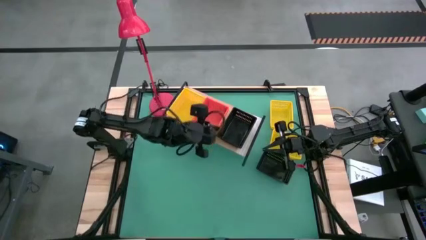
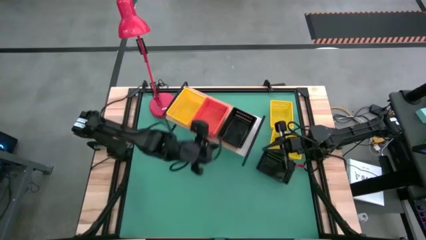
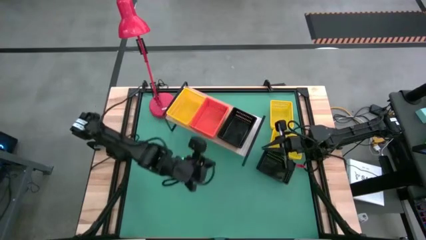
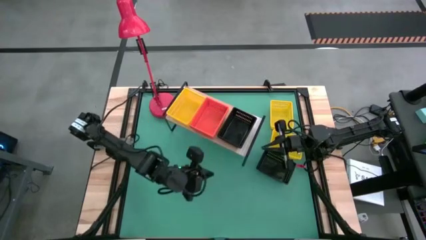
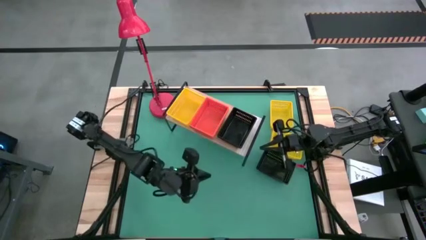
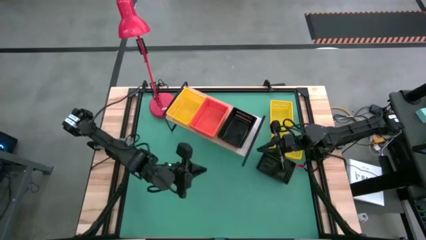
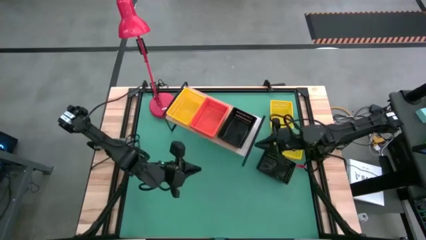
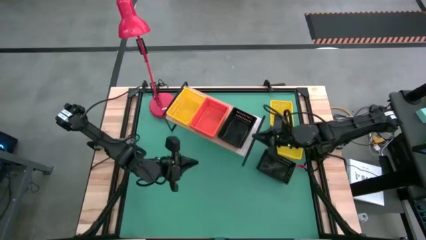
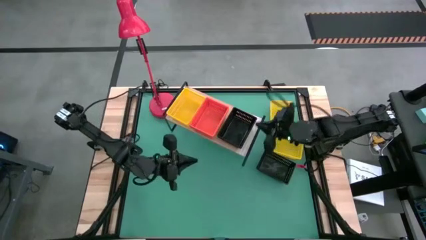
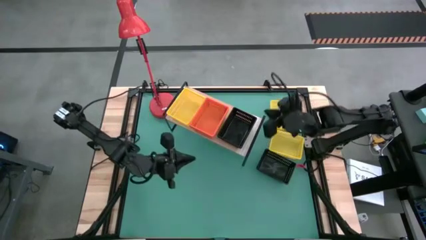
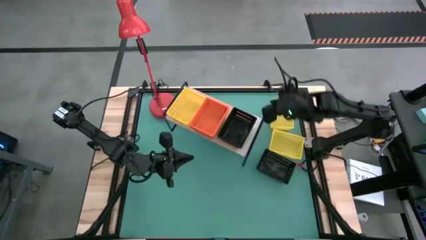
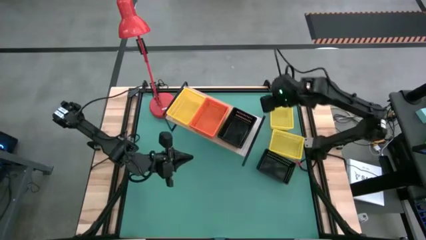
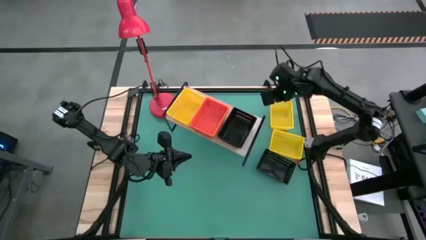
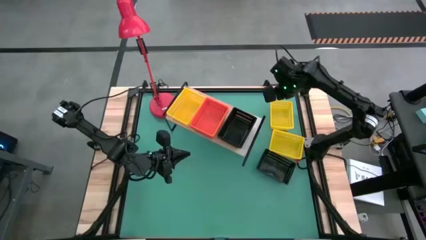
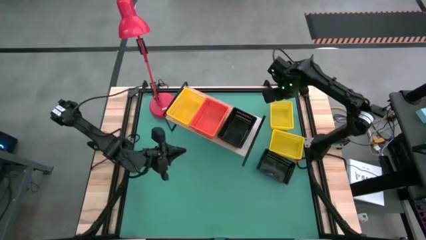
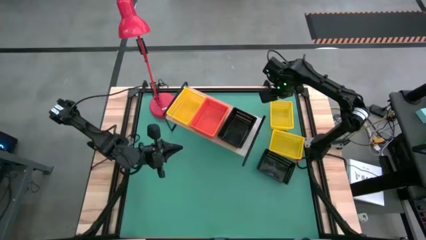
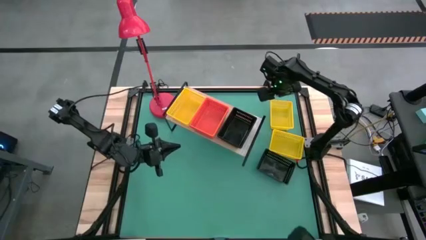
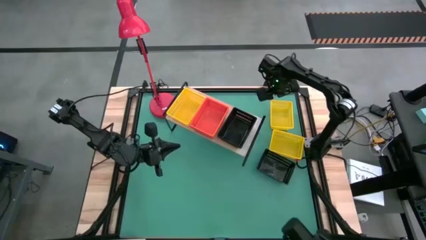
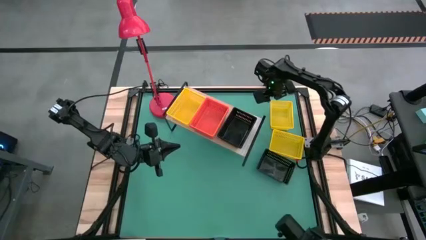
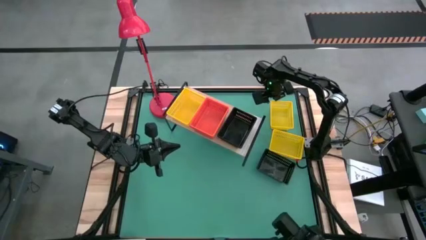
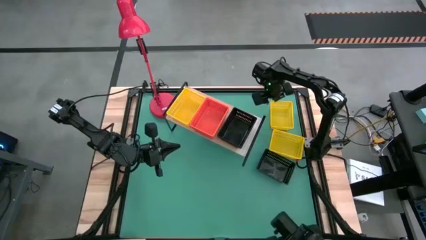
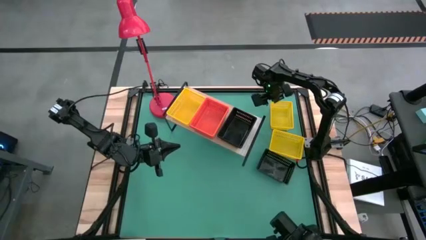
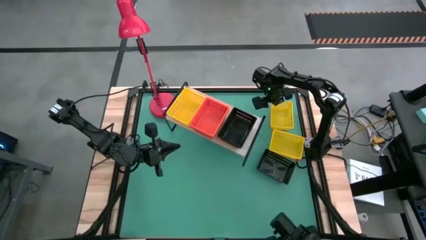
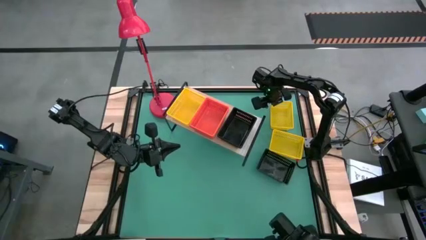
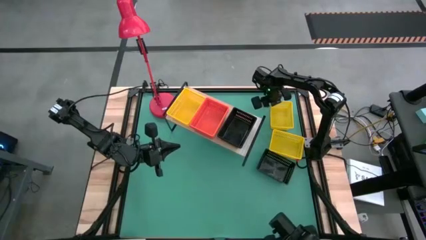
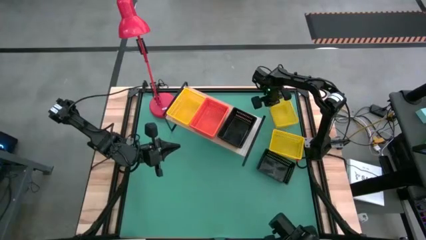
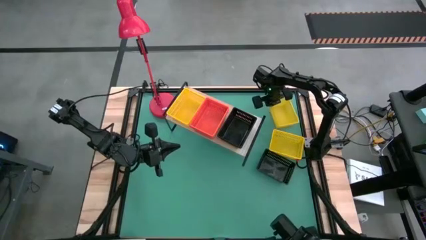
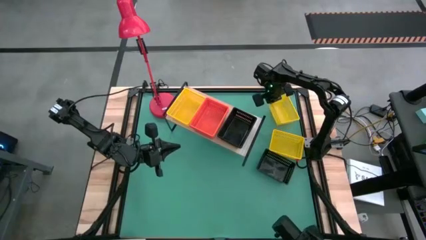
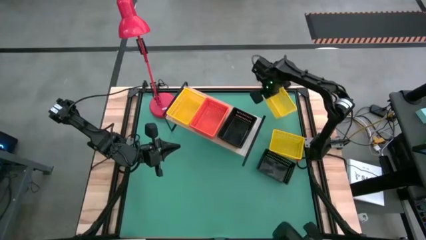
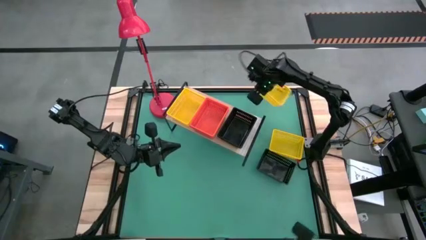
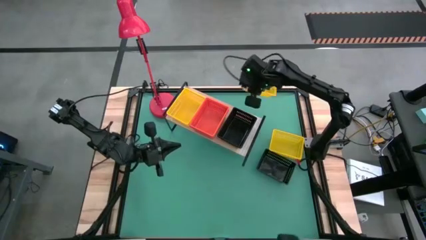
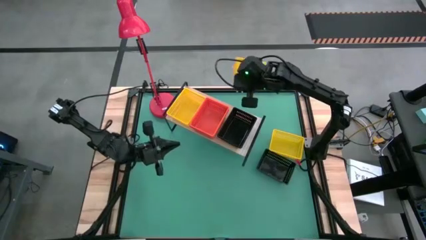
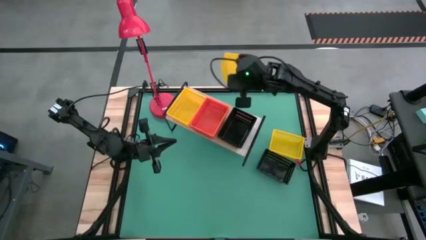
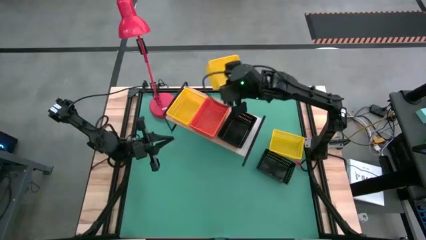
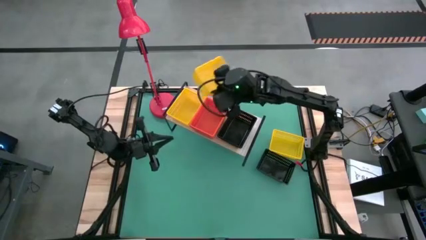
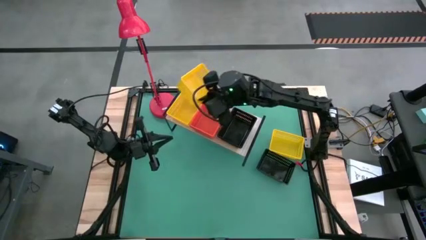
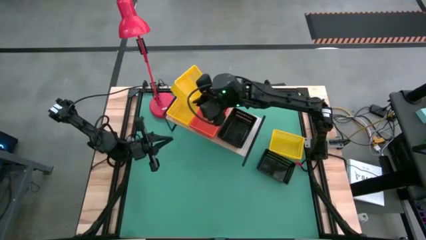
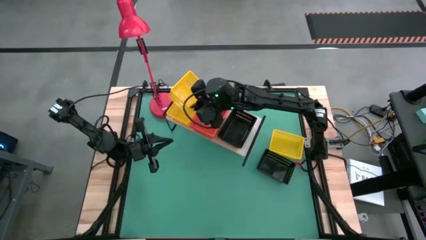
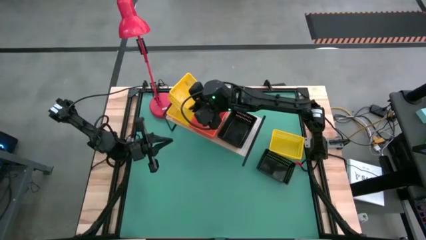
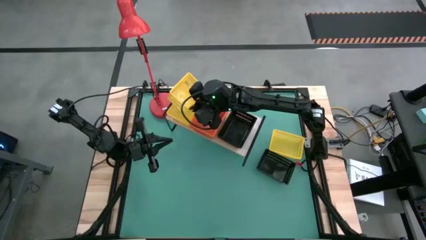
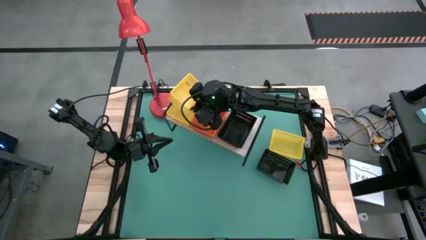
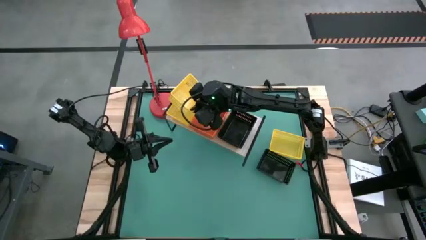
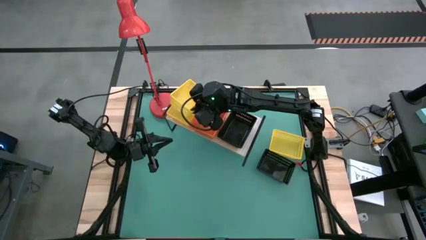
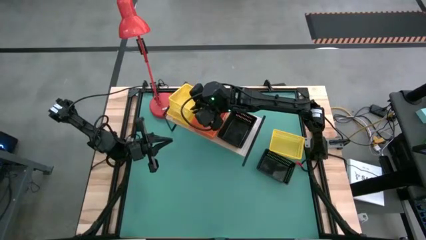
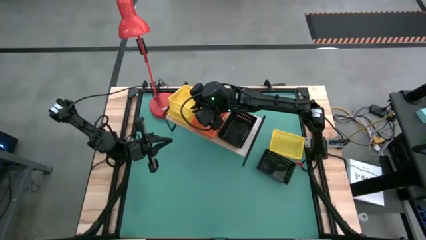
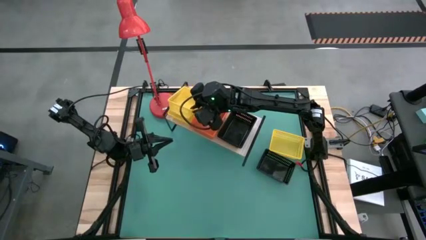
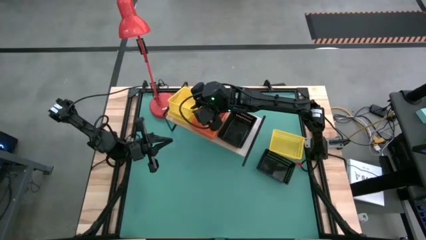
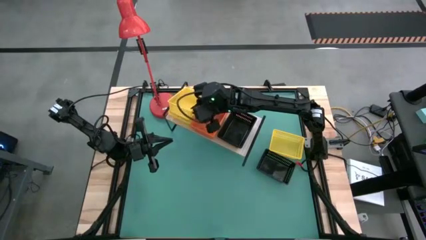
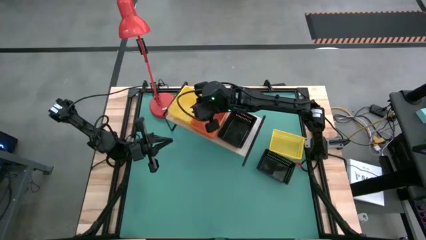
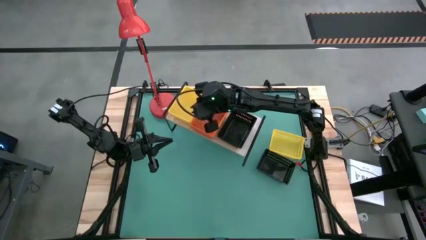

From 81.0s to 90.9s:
Task: Stack baskets on shelf by color
Stack the top yellow bin on top of the other yellow bins on the shelf

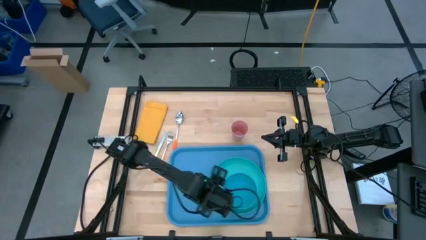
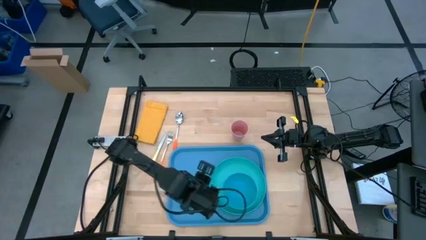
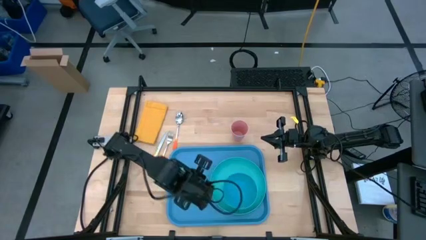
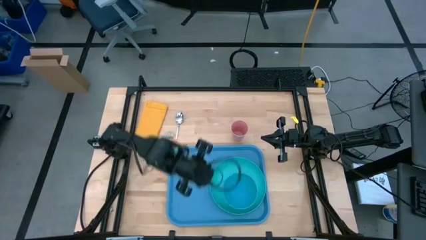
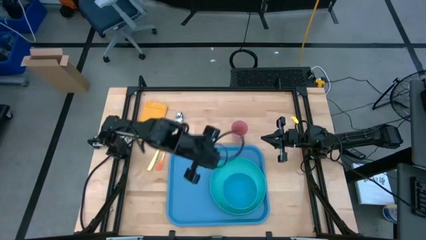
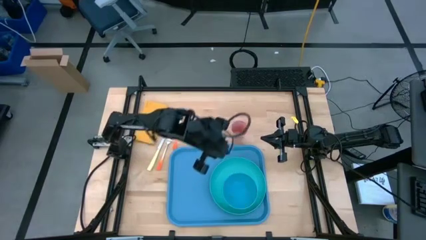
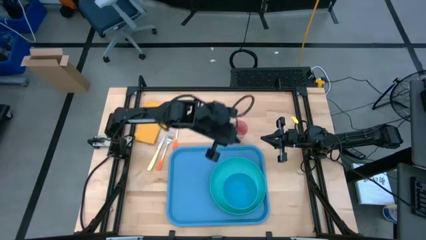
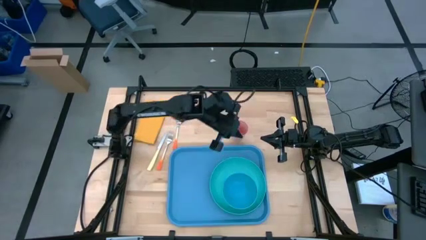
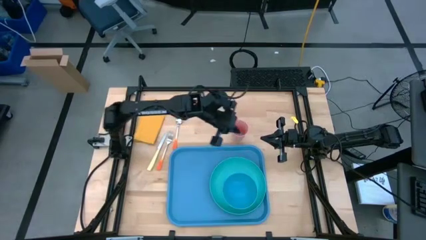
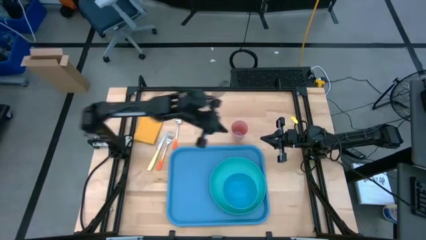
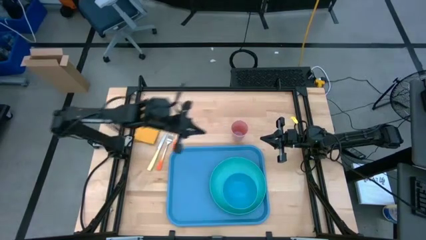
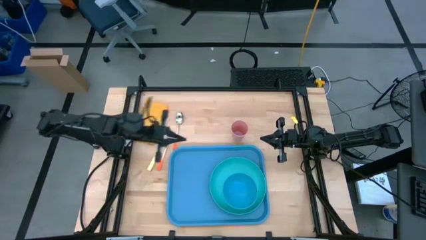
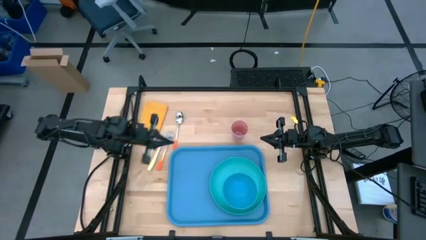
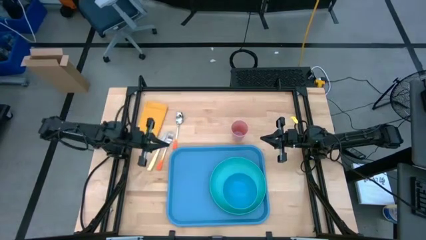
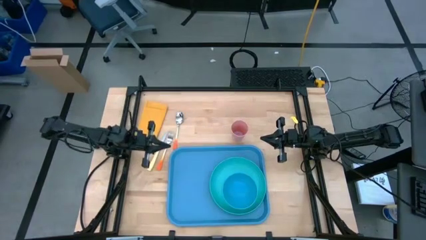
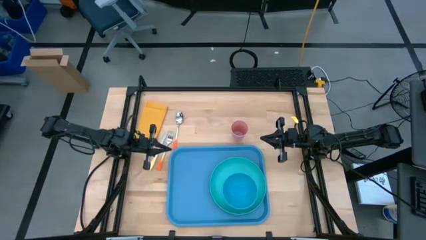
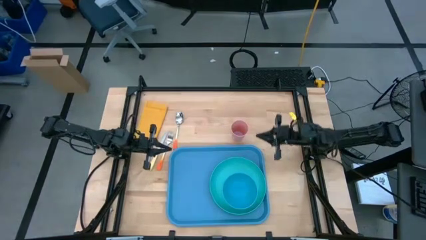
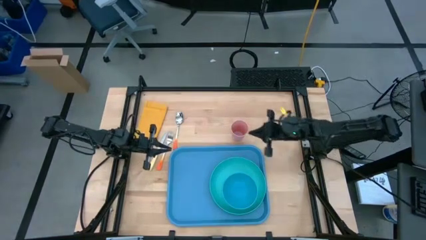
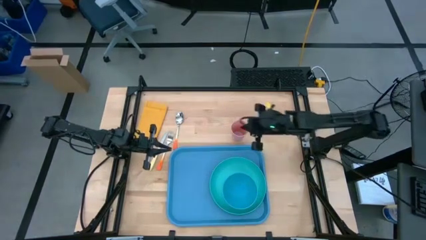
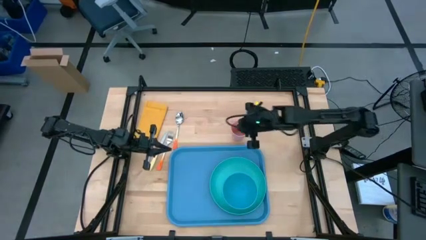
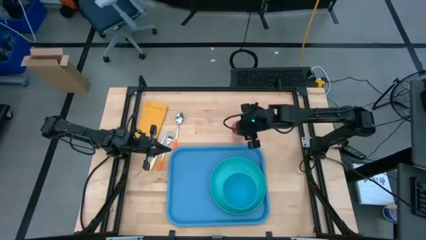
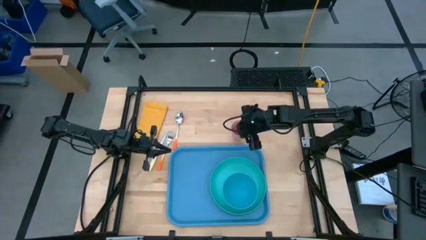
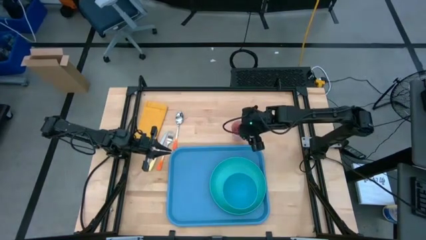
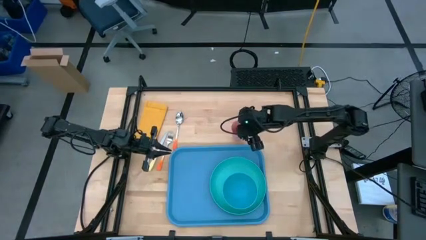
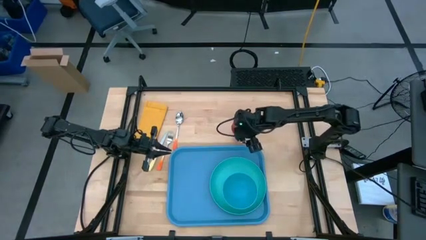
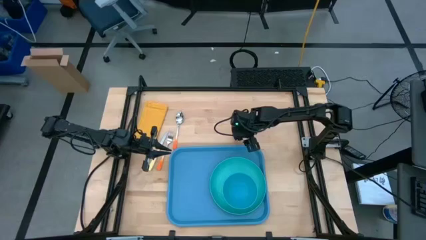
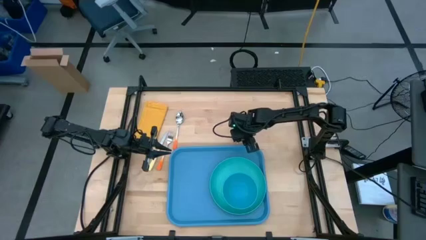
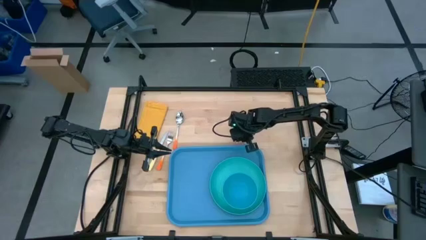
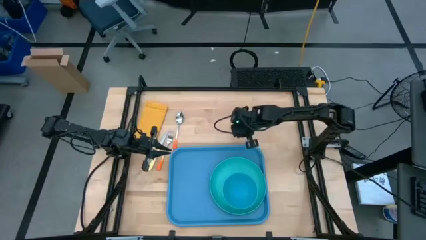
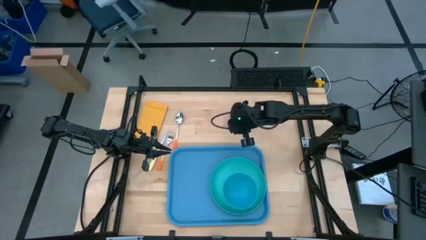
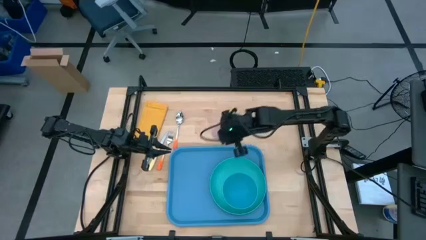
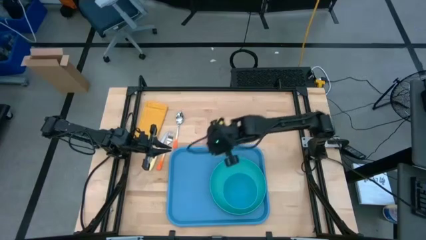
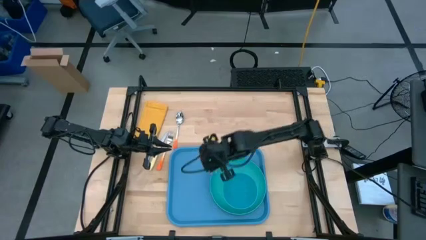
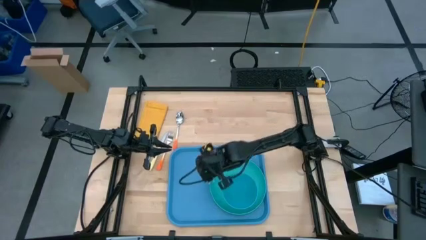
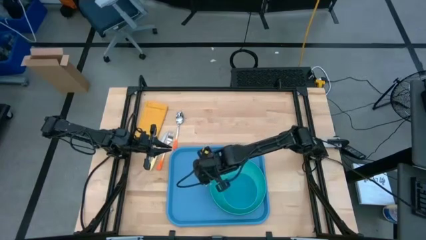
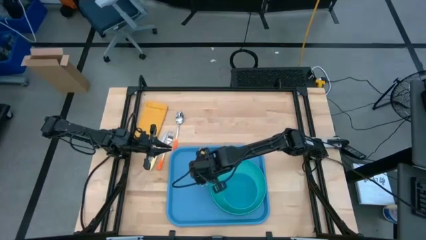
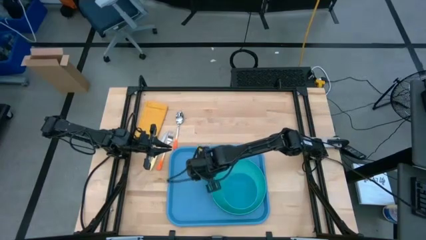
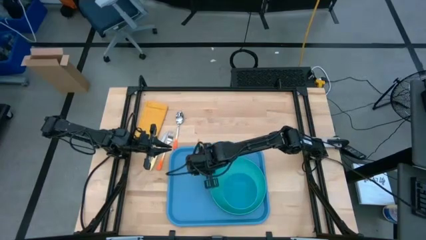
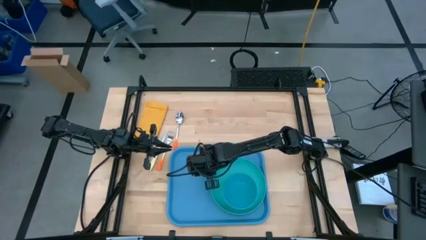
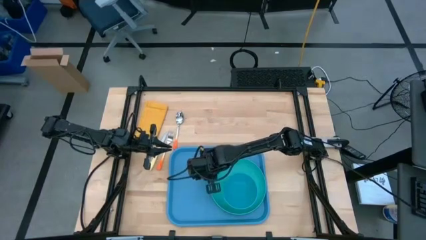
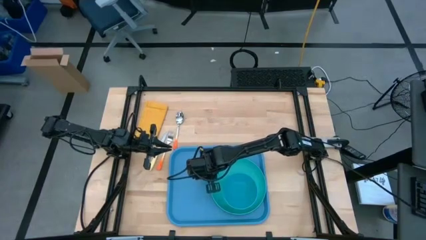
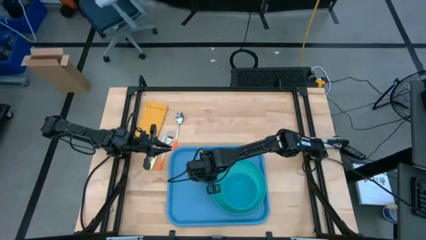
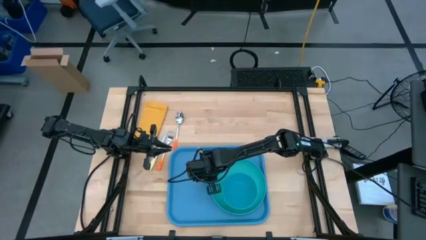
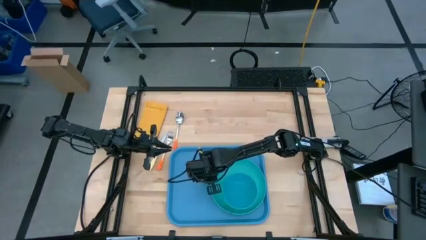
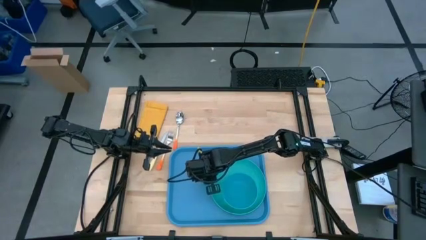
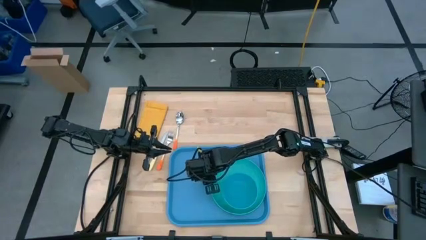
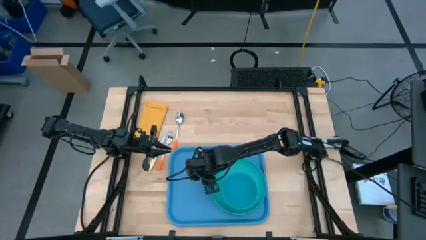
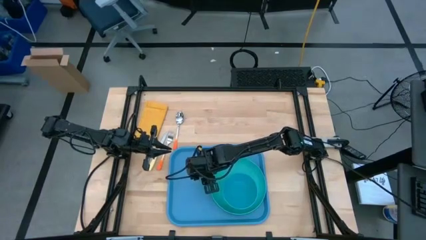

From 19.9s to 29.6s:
Task: Set up tray
Put the pink cup on the top left of the light blue plate on the blue serving tray
